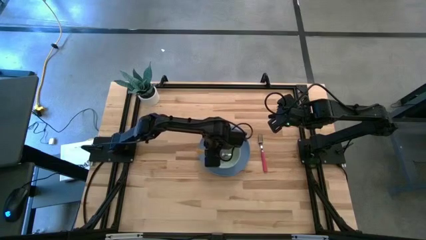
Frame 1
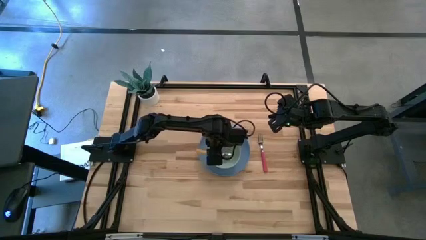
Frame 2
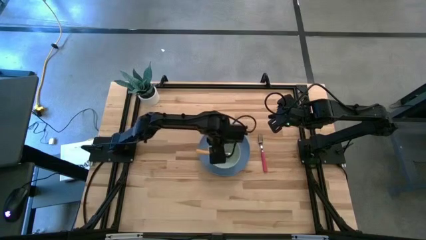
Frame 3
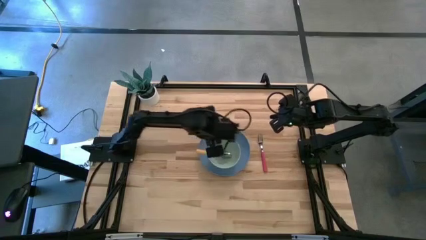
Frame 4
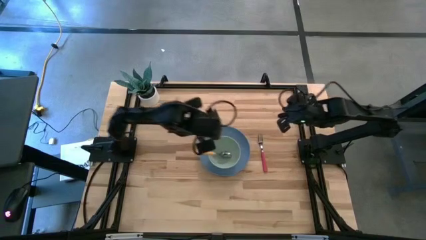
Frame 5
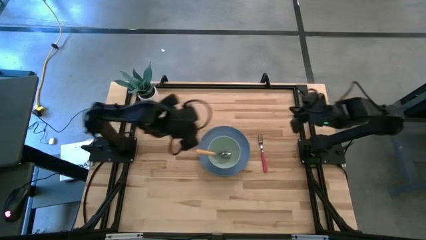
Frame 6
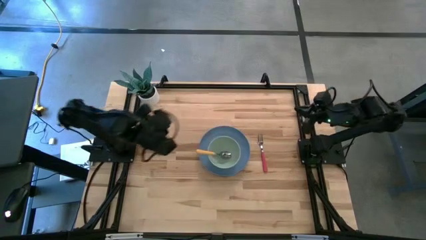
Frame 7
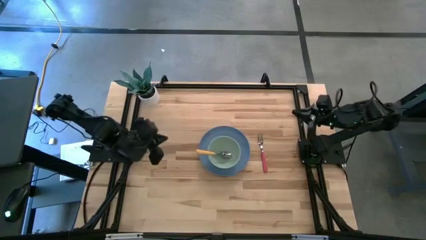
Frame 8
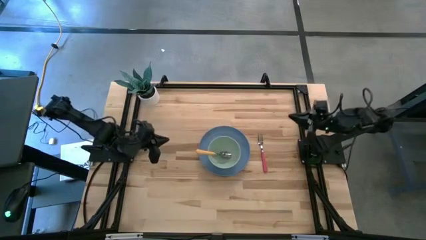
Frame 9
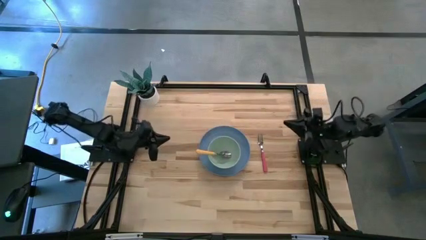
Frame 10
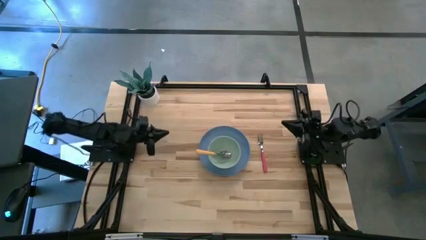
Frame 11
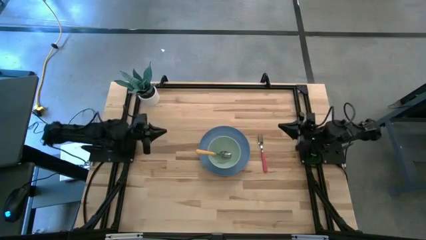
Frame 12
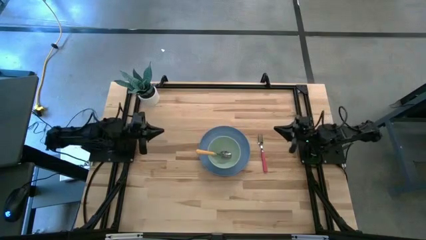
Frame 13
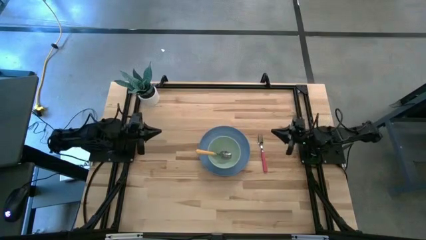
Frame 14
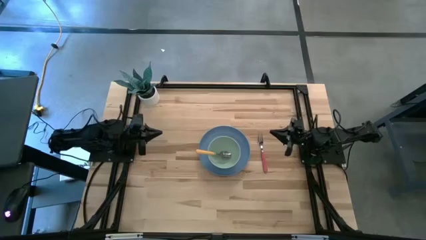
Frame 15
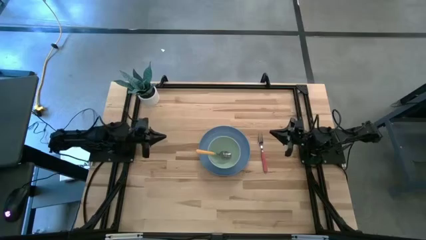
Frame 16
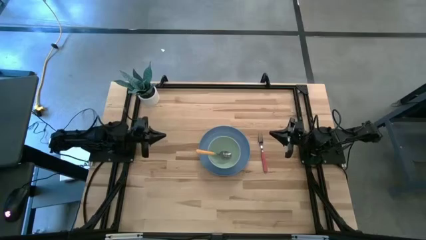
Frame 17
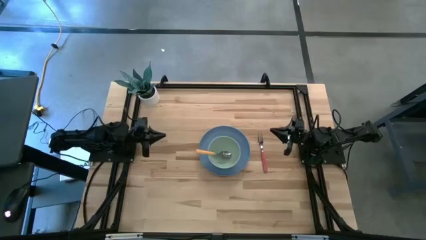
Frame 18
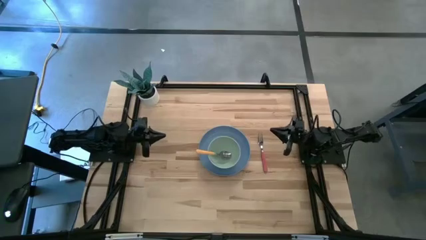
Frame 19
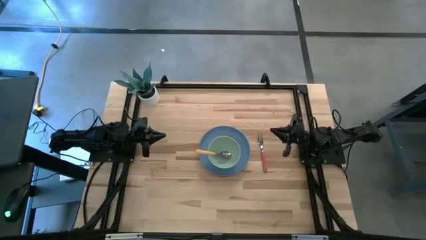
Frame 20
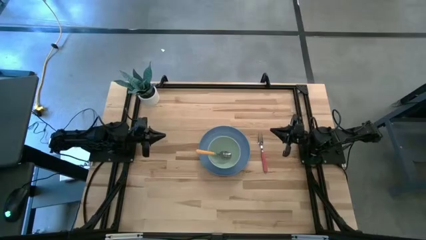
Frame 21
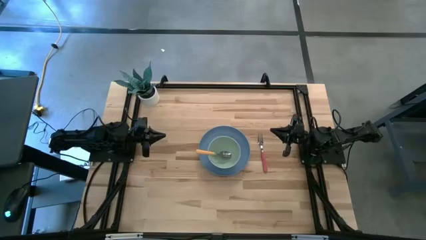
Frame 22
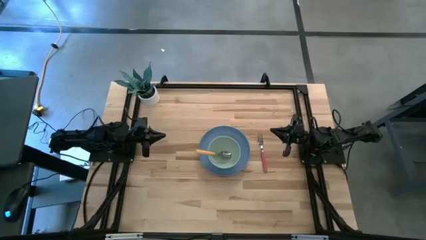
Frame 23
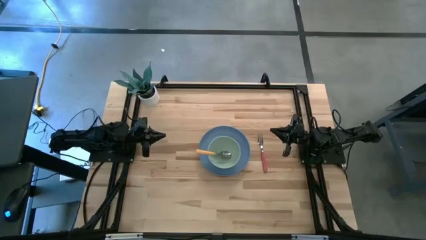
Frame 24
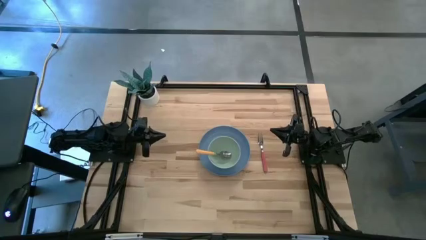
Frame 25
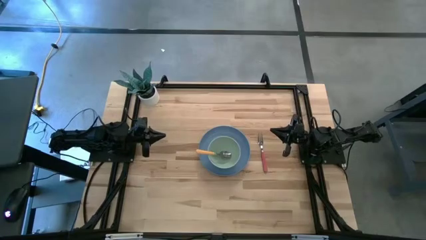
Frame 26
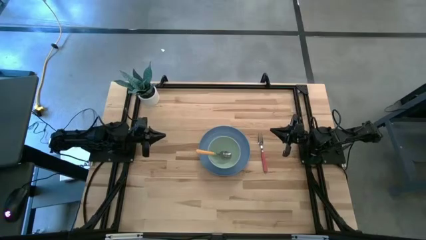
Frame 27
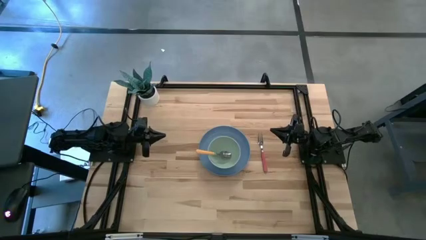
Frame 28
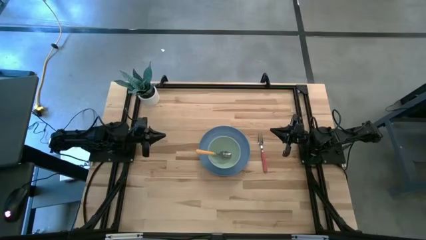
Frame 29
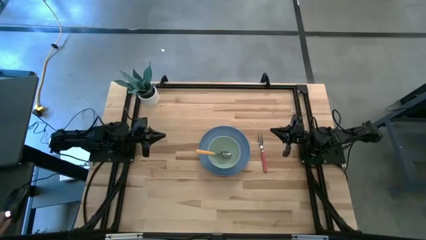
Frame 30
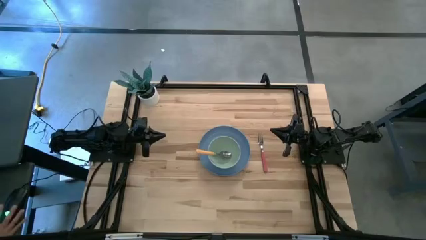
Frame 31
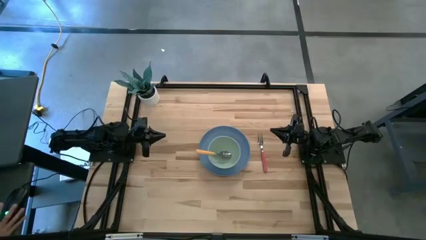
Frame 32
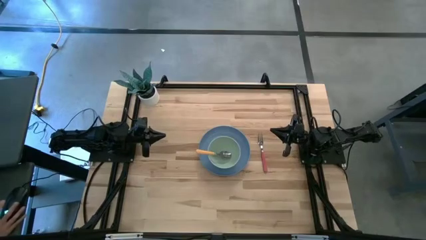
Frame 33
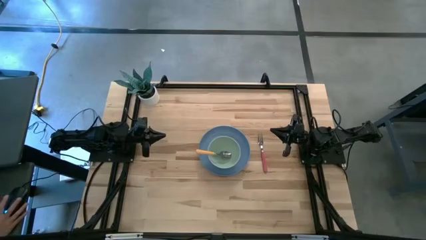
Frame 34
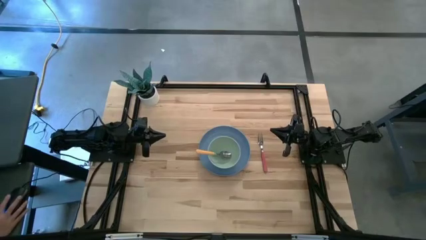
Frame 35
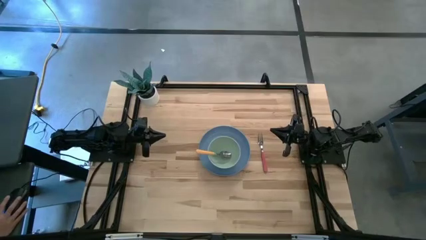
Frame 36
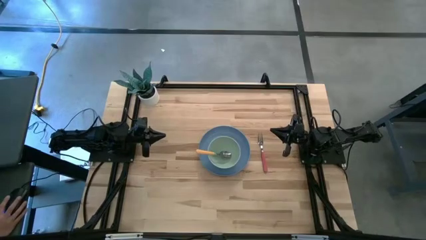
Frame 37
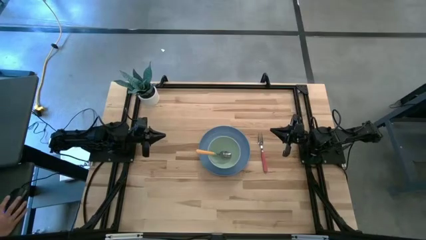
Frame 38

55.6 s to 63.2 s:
Task: Set table place
Return to Home Position

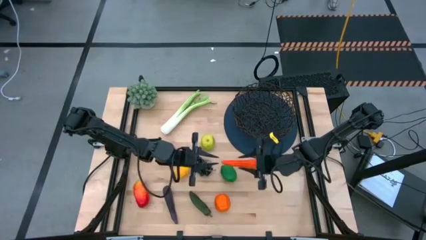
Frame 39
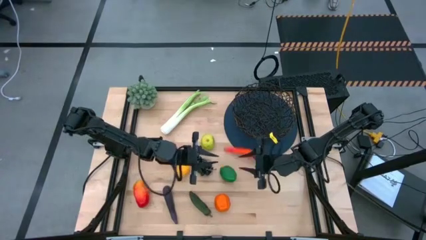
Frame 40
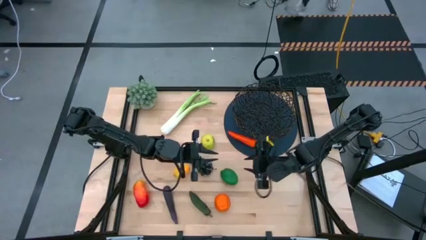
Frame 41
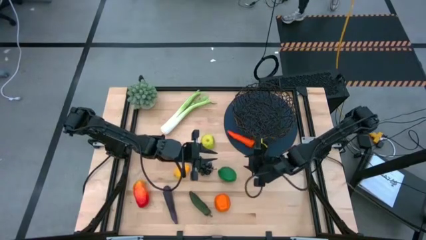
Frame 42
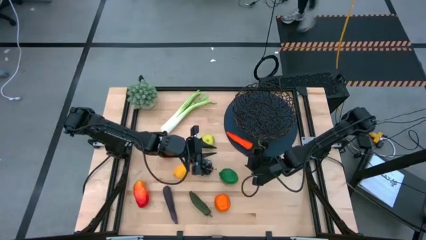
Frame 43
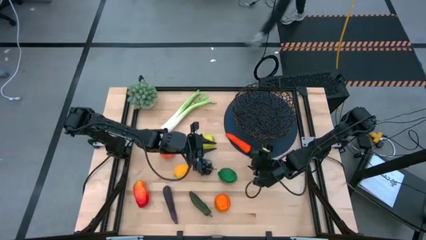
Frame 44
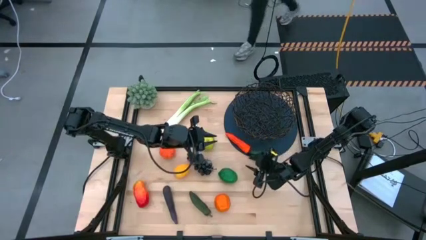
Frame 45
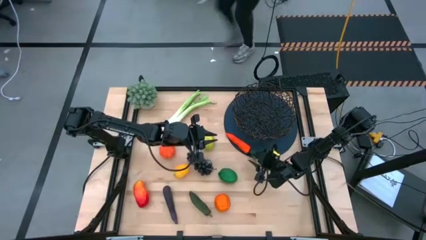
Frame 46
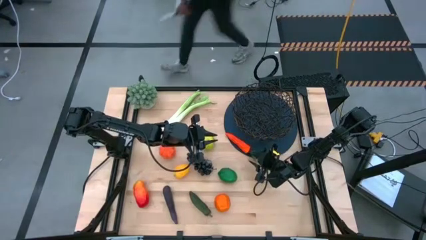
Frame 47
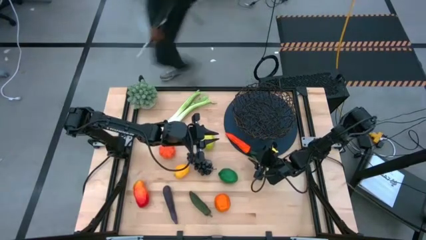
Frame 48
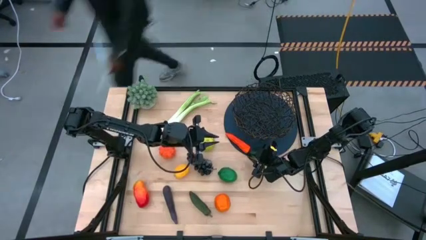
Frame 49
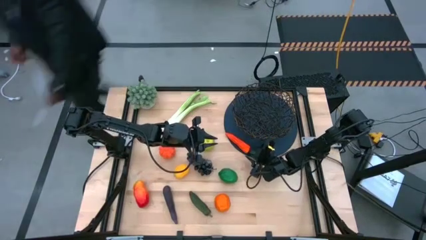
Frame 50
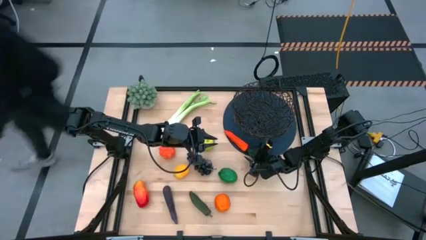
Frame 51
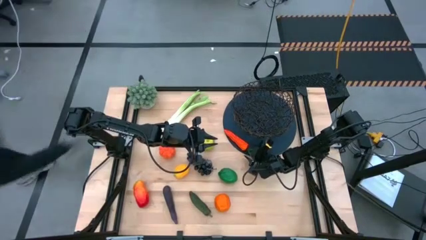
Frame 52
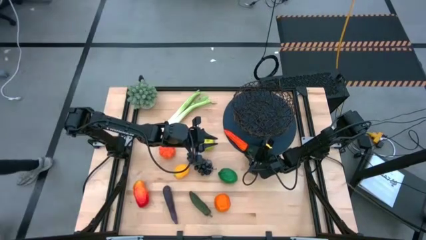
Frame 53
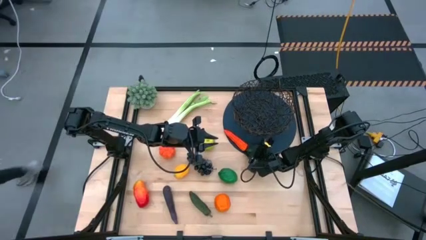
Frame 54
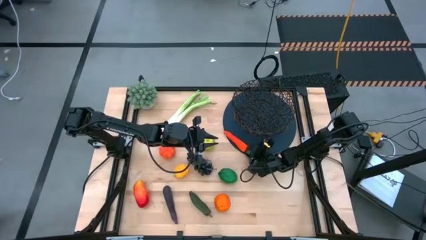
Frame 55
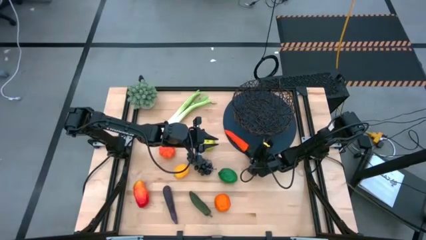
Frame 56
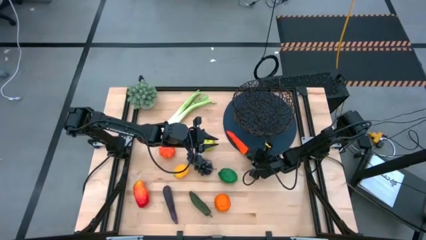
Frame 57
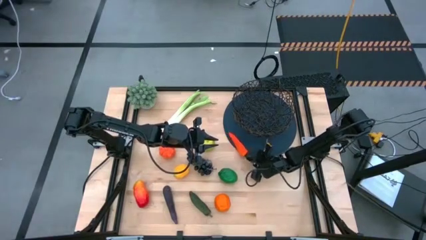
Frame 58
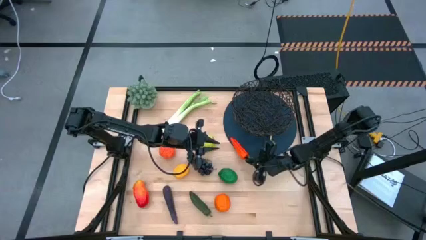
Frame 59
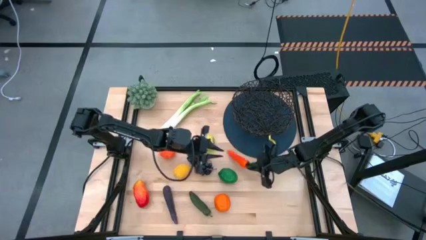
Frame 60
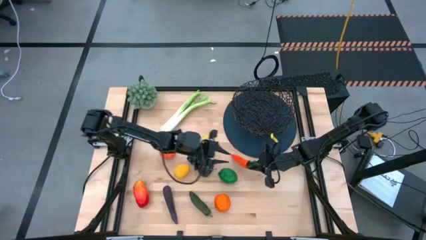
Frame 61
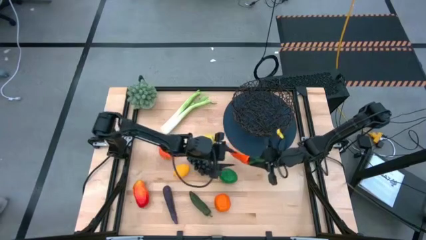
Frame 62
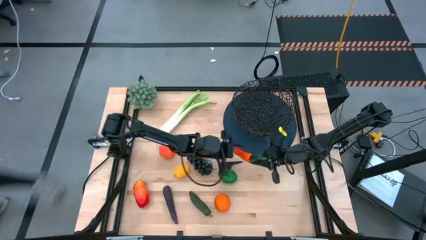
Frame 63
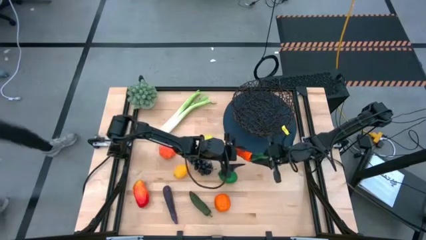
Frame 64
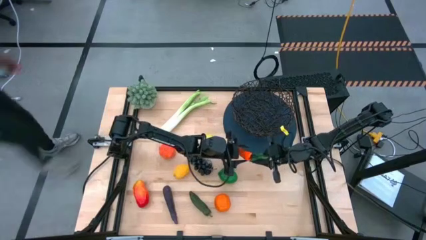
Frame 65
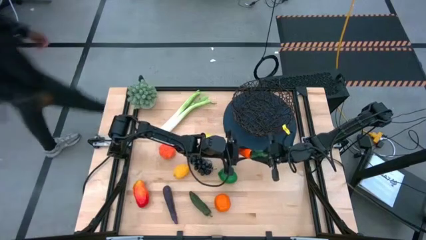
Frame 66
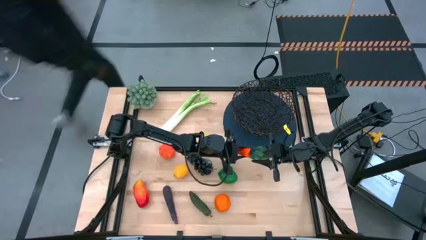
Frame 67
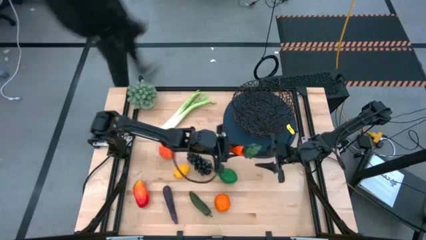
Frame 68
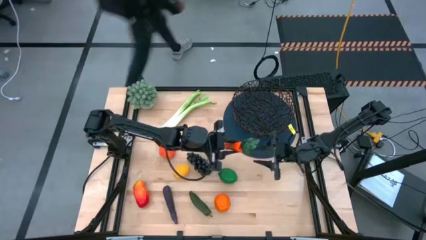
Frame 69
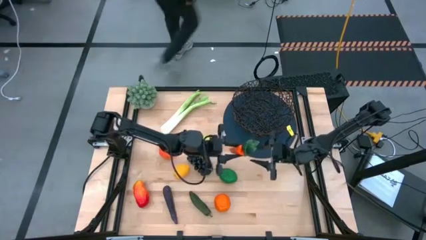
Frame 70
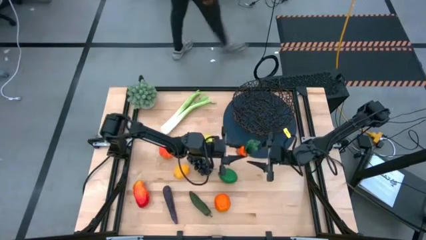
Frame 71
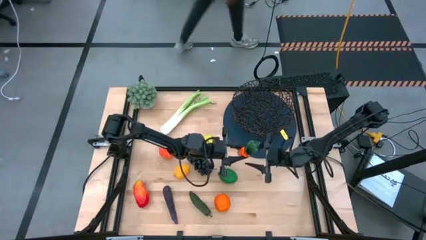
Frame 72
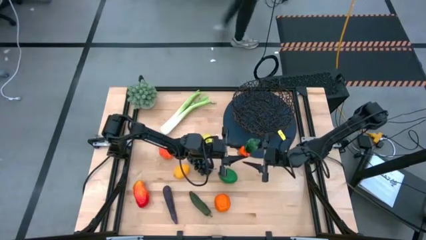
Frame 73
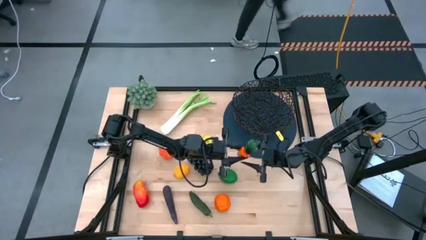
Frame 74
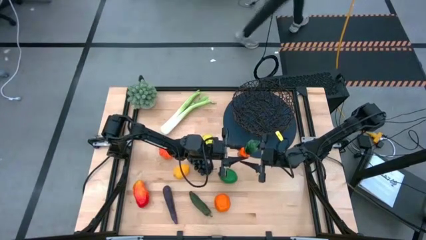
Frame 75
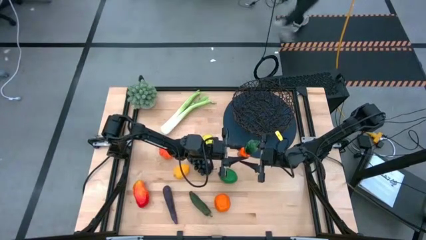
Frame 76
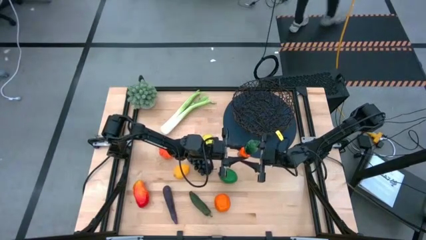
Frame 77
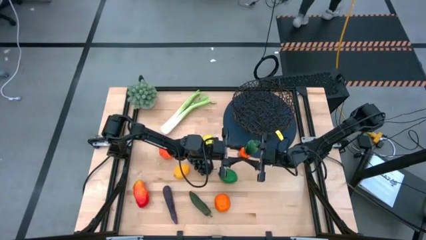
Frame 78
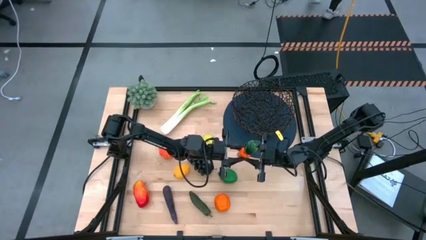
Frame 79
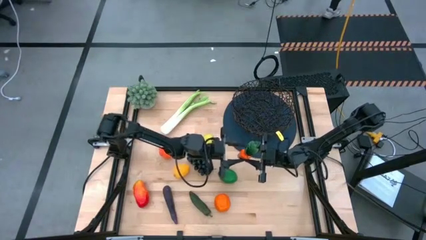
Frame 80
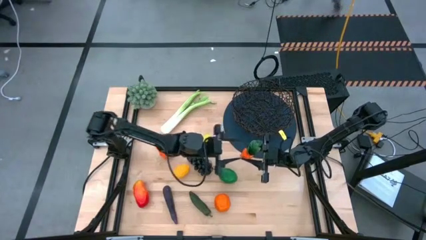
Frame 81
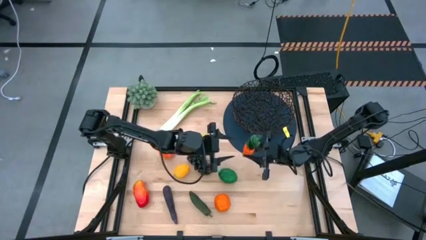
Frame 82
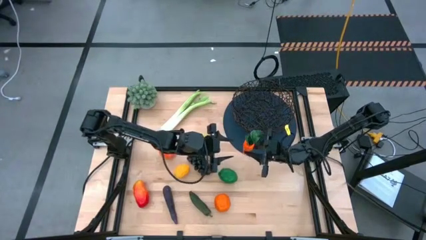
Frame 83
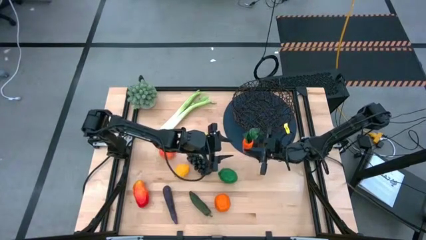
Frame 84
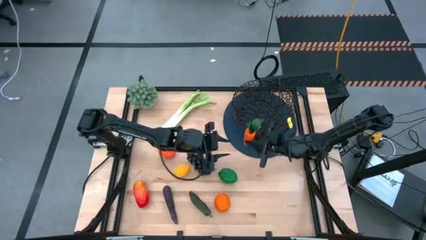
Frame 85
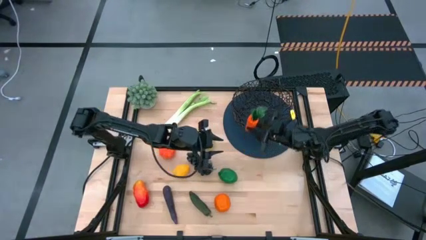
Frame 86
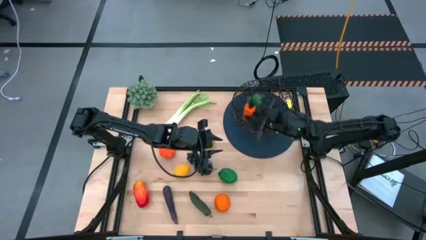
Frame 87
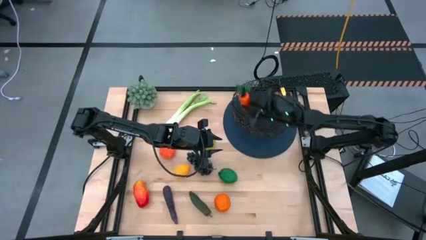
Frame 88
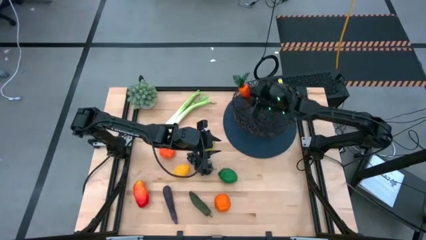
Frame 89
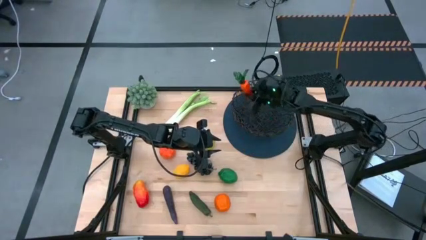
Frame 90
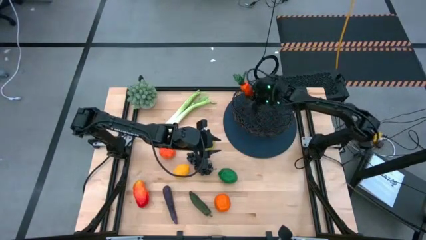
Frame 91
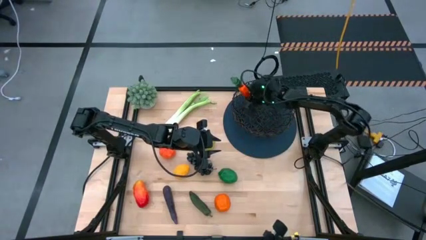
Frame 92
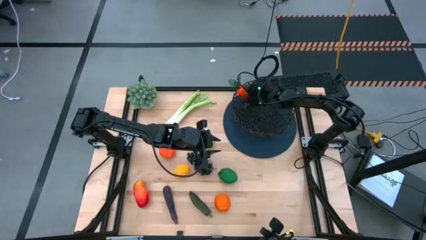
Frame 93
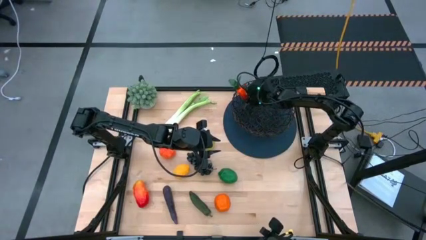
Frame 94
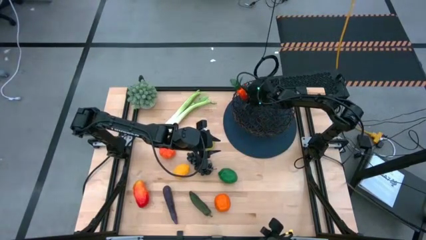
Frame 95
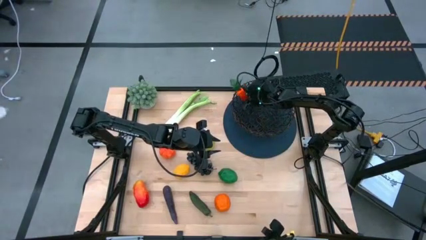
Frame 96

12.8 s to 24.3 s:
Task: Build produce basket
Put the orange carrot into the black wire basket
